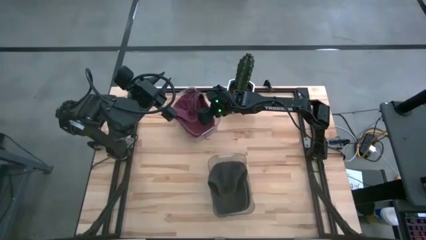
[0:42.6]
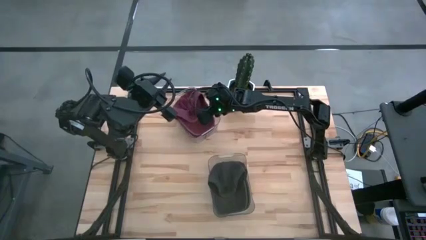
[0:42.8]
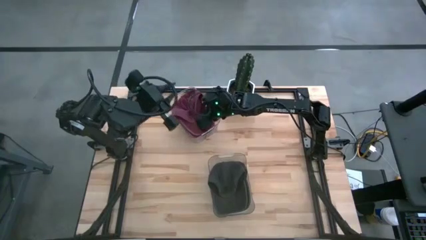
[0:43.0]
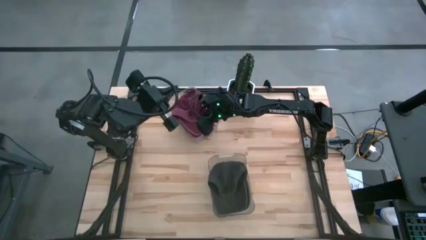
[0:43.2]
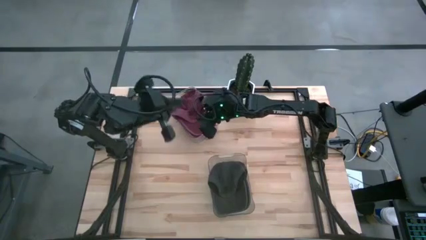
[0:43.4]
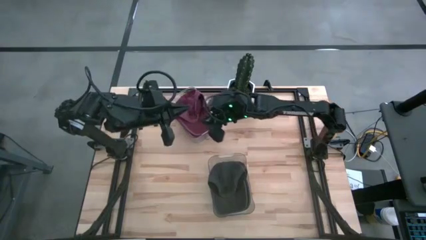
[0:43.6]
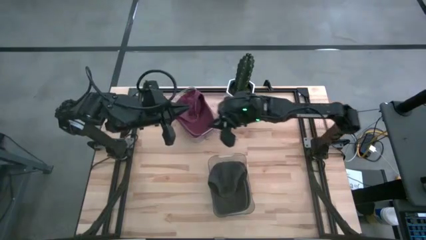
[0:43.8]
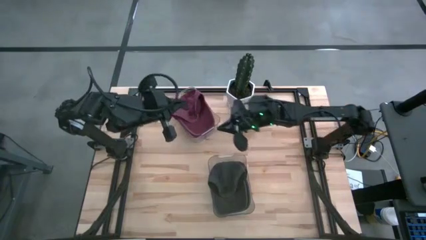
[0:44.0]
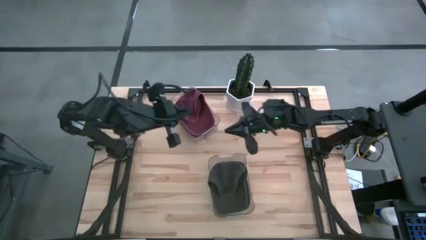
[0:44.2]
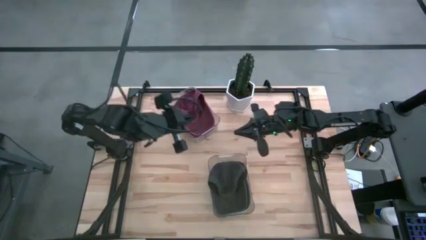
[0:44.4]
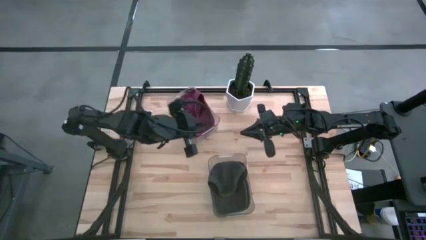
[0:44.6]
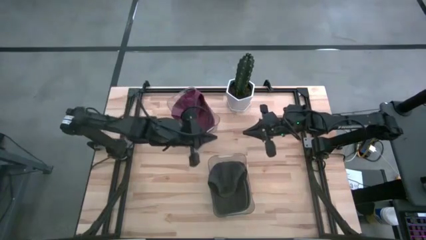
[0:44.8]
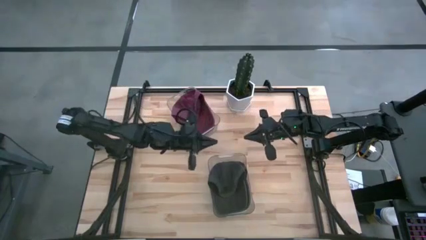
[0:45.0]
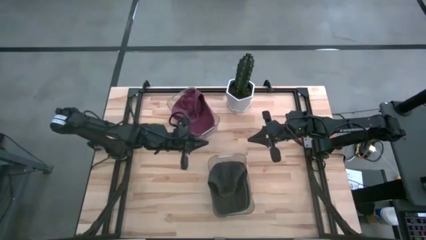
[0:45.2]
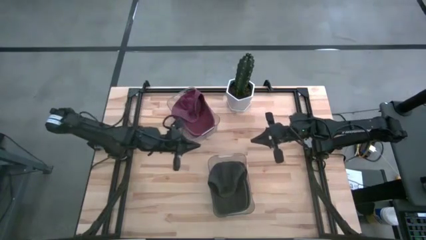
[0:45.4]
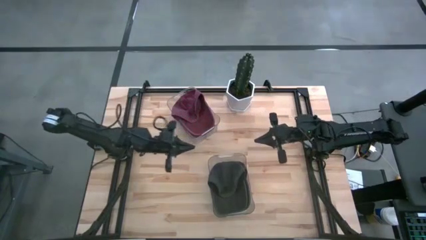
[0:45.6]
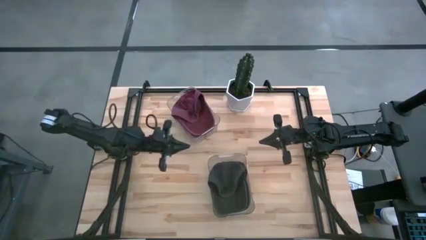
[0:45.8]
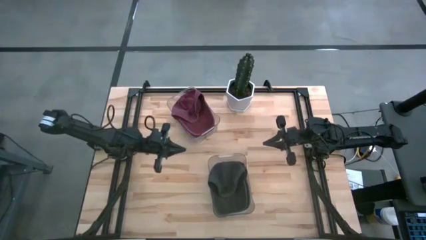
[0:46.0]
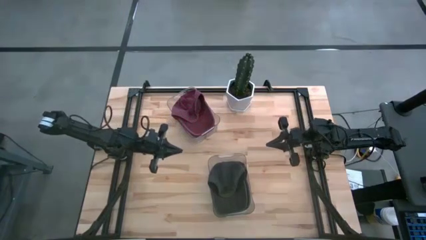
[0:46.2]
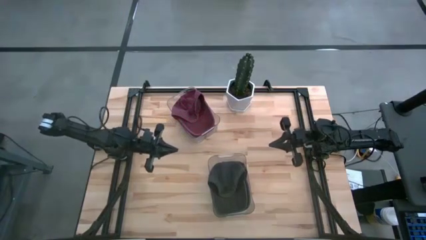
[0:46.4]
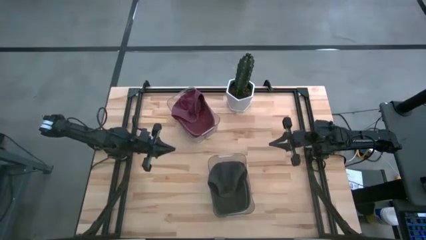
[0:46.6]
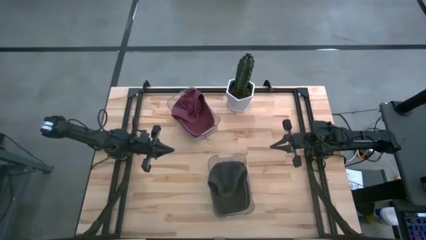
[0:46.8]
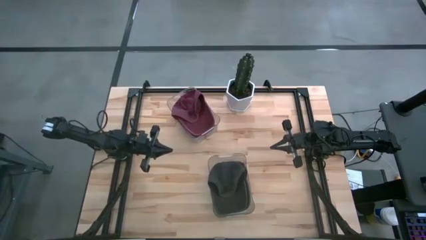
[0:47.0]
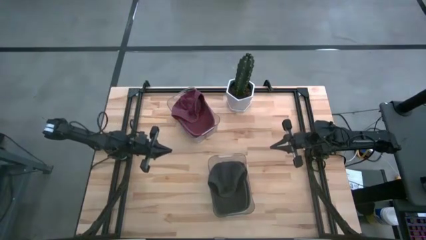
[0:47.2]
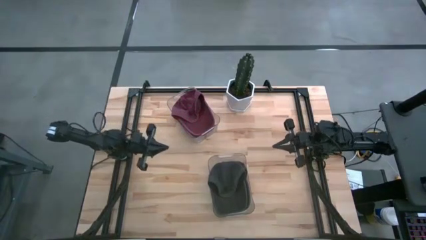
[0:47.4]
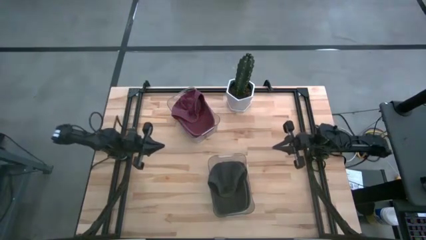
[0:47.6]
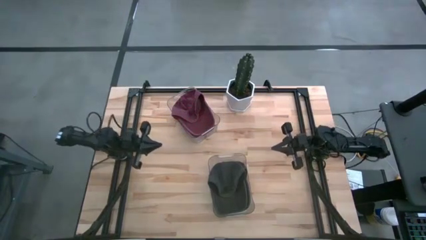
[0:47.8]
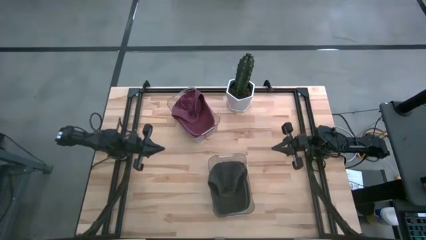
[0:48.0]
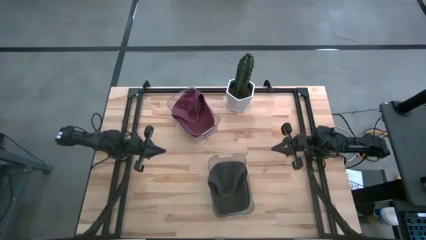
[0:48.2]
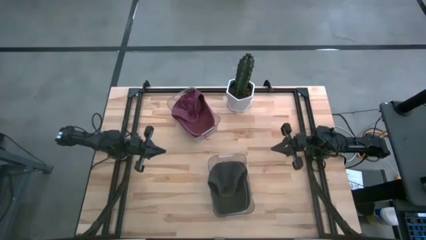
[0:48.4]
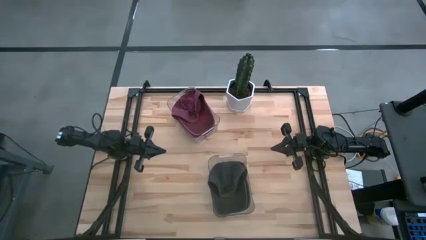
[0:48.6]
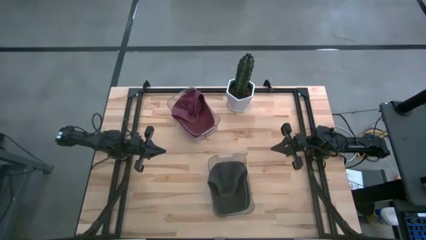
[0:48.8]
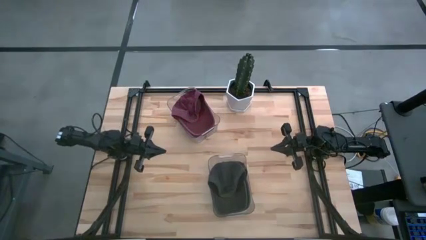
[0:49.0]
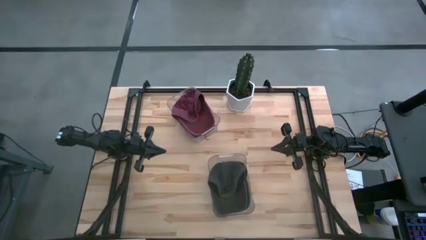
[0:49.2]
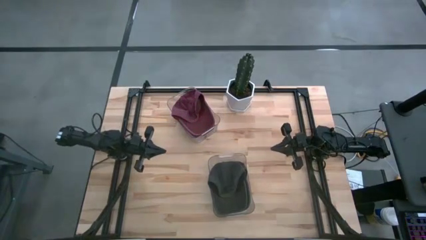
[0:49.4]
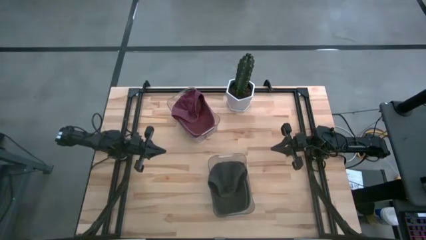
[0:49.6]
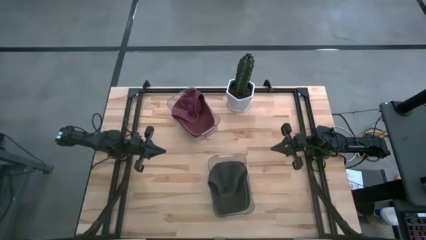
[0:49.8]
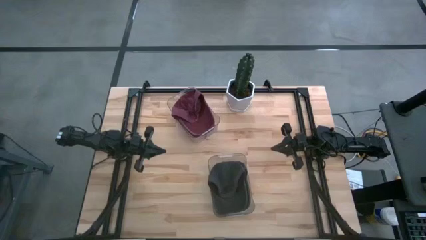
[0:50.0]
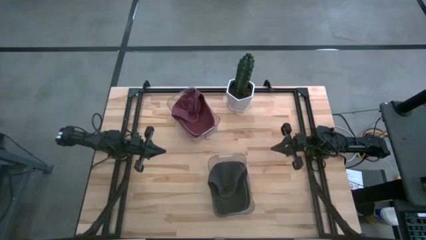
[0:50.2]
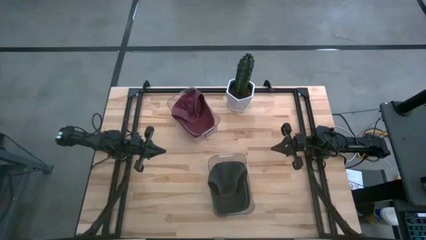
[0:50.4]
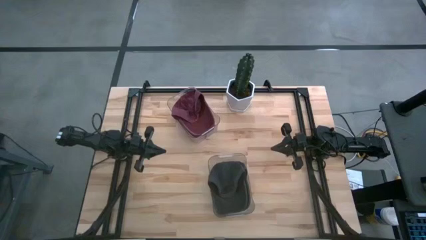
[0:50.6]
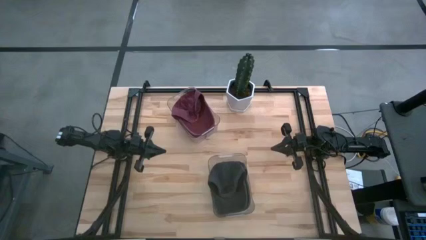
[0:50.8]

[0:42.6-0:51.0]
Task: Pick & Place hat
Return to Home Position

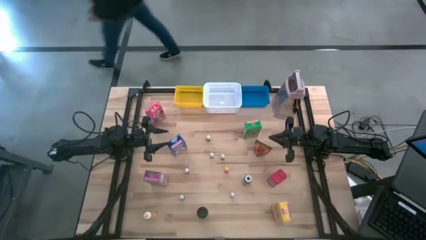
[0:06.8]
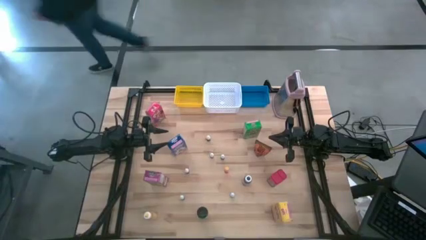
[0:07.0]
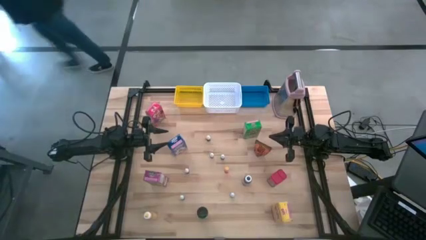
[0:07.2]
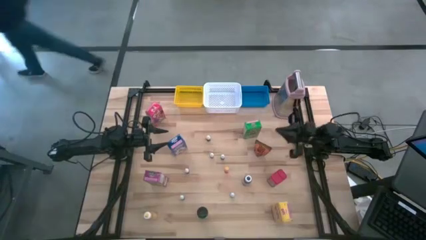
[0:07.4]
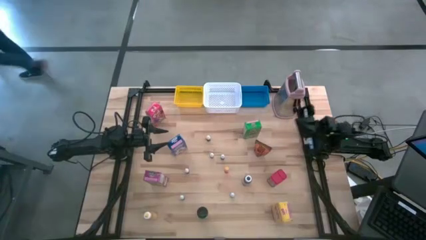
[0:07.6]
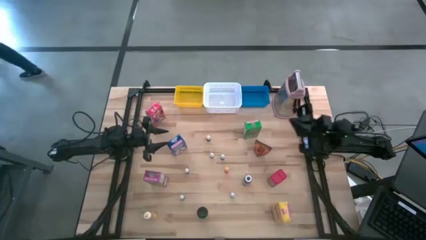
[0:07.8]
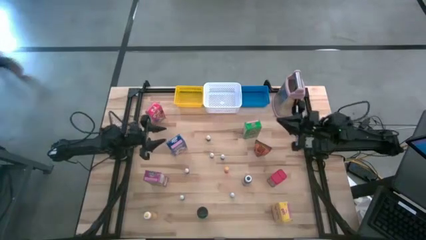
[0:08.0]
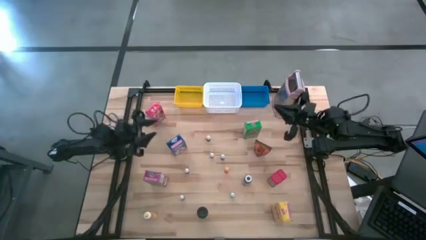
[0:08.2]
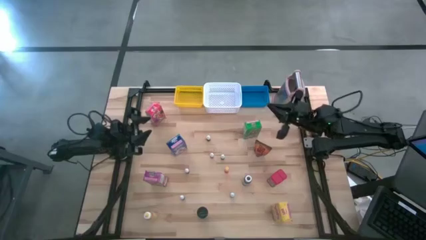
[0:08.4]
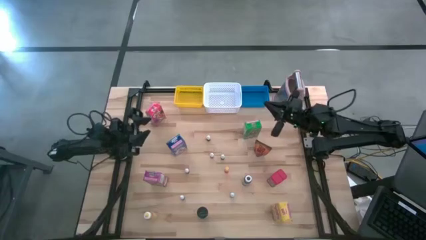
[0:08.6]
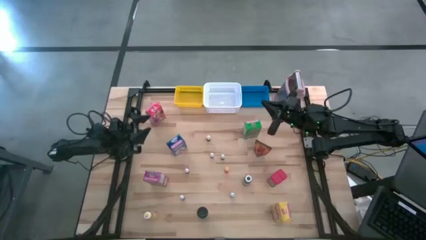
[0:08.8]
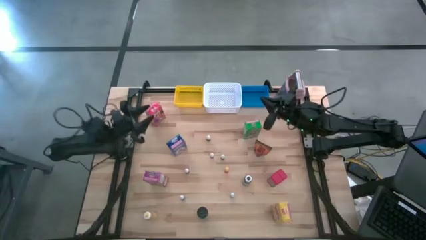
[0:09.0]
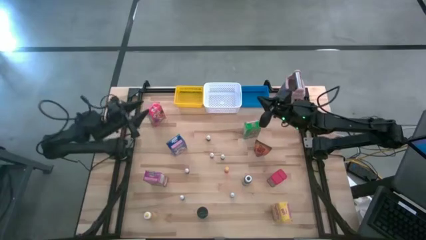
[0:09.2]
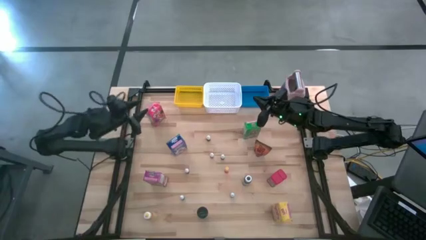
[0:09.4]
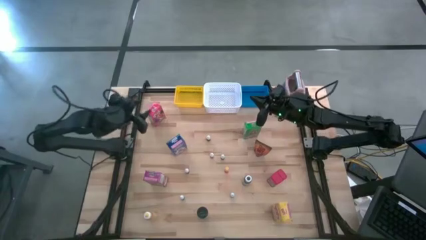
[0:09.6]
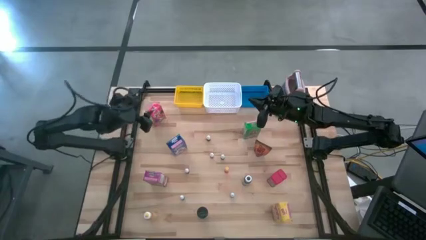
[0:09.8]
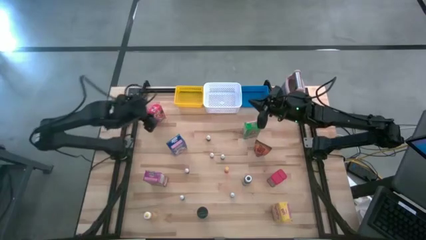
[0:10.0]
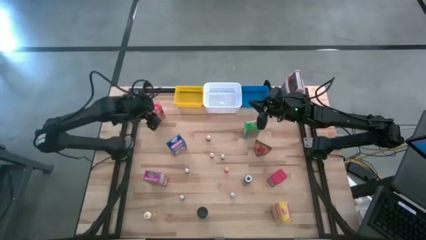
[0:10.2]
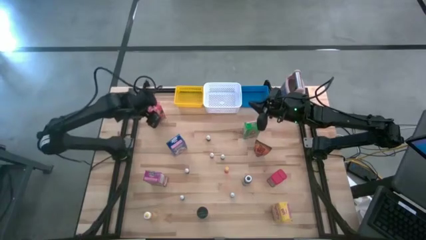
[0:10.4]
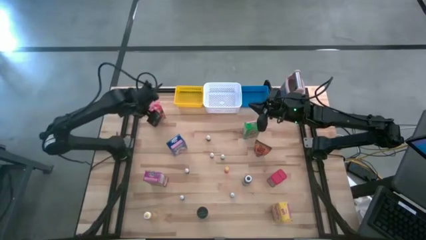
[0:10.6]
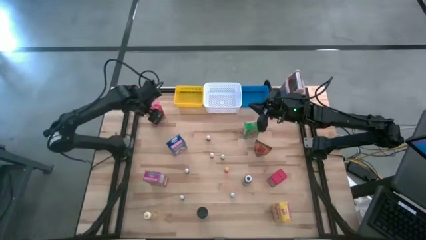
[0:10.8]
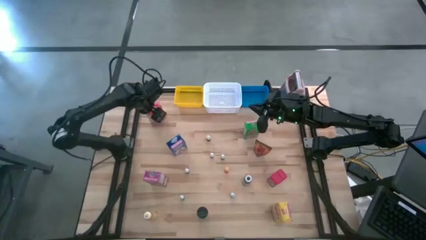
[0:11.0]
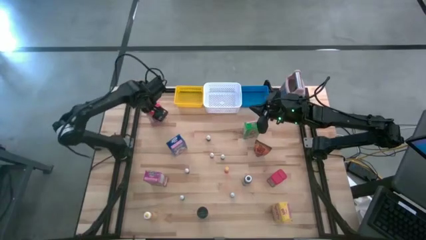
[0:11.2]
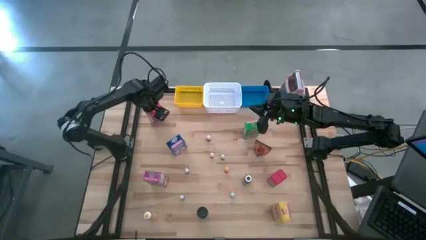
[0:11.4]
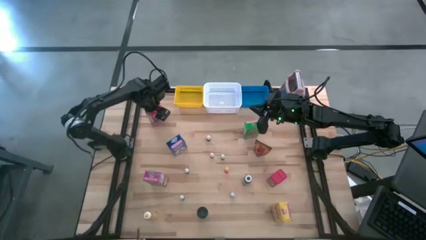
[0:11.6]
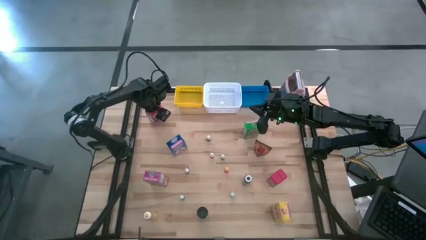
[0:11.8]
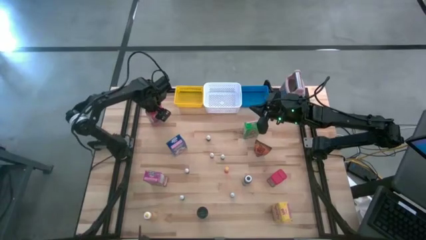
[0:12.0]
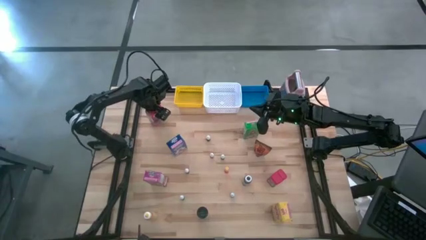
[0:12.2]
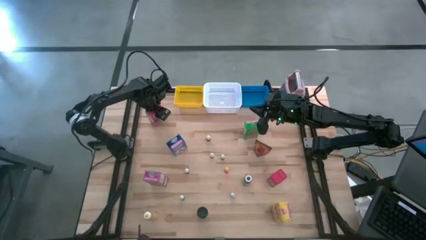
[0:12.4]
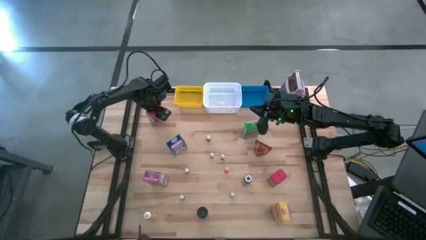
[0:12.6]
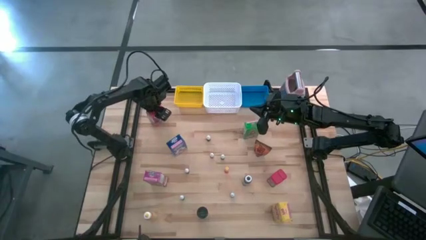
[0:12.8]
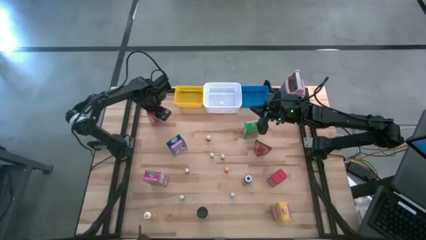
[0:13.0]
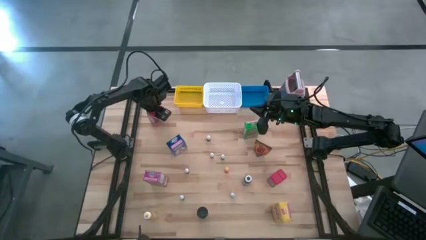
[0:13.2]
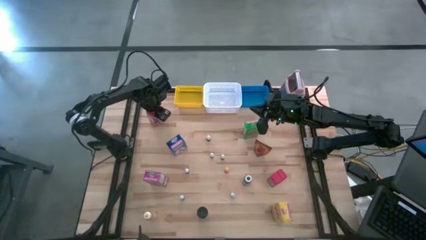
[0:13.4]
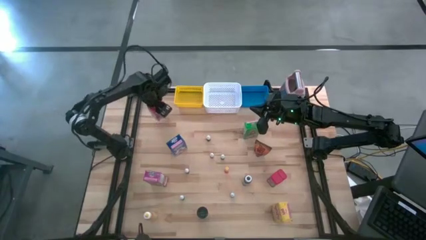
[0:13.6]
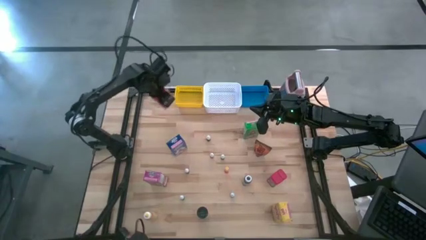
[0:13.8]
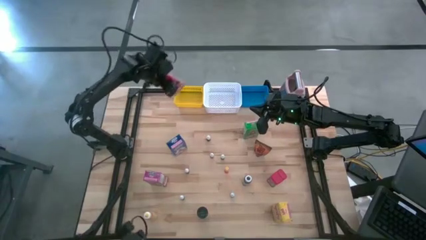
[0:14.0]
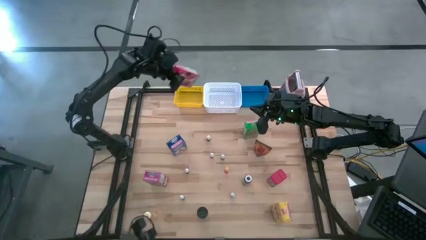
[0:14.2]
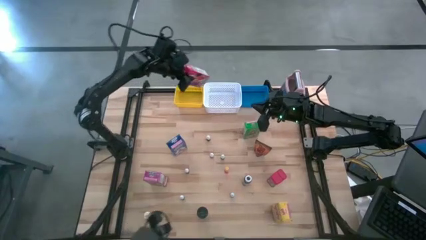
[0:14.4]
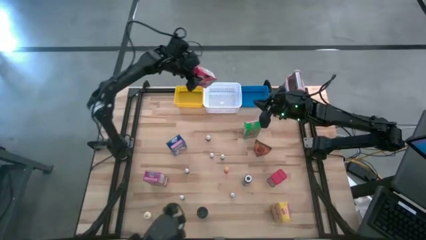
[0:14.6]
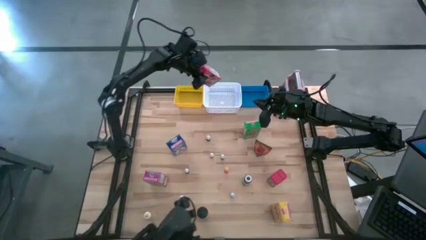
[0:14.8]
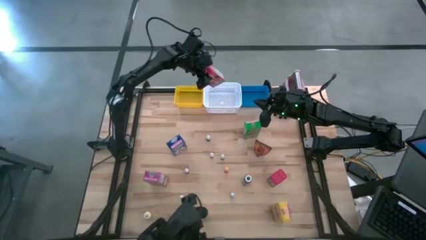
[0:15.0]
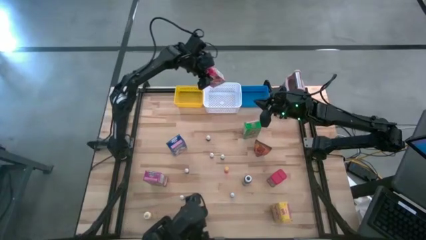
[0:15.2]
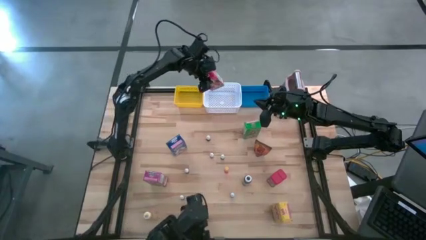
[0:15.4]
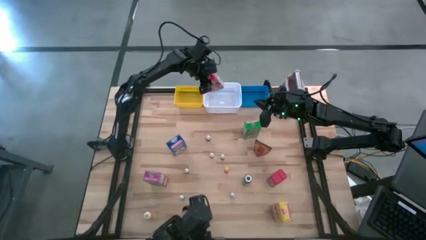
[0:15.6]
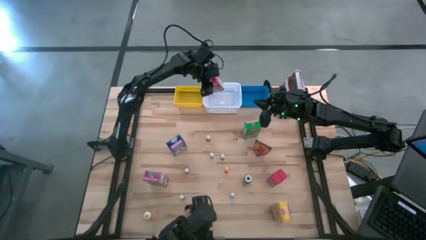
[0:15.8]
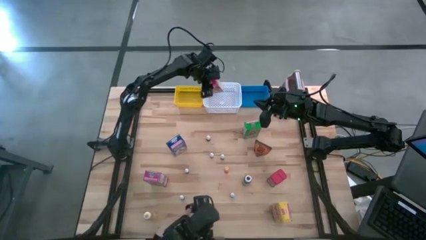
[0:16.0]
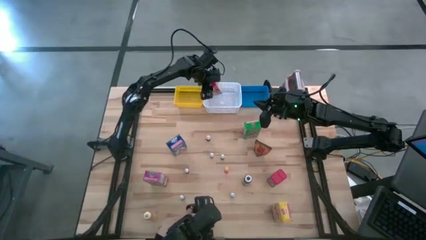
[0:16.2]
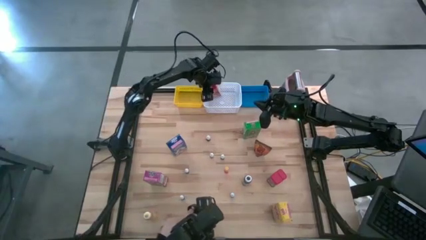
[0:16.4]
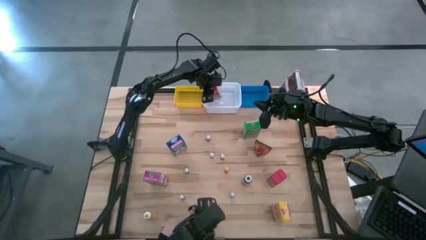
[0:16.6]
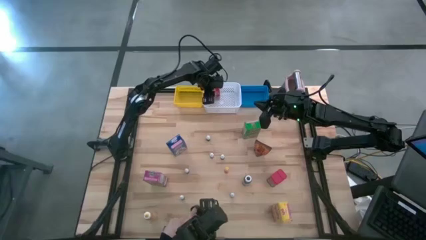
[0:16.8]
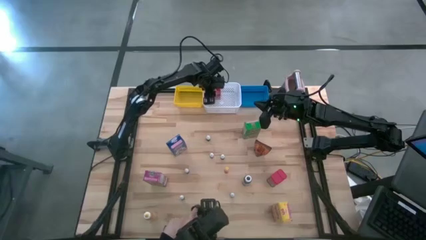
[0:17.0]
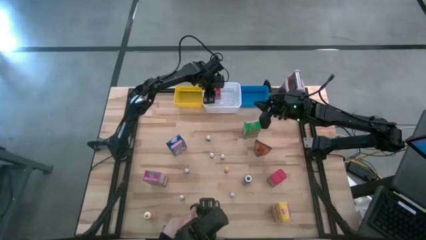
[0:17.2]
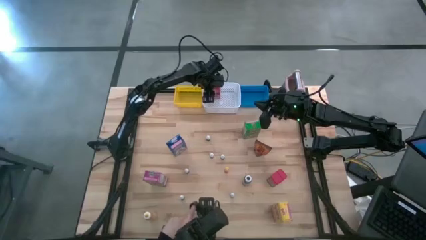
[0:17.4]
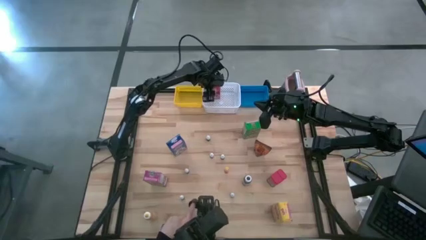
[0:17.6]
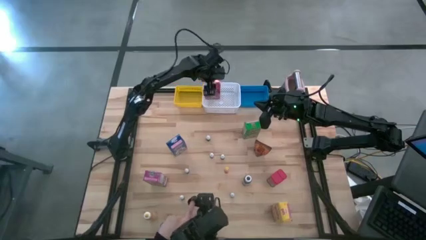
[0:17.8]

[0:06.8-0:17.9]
Task: Pick & Place Kitchen Items
Put the red cereal box into the white basket
